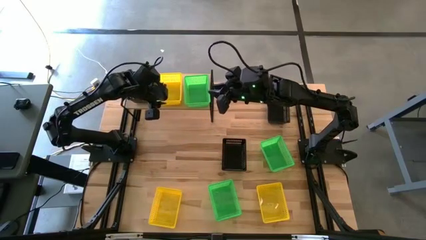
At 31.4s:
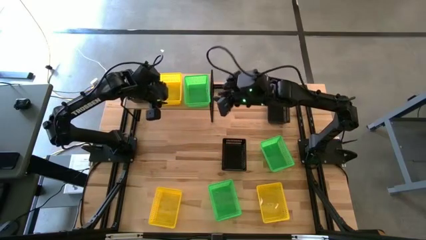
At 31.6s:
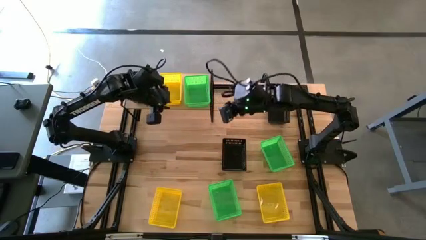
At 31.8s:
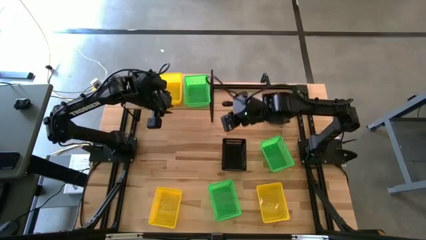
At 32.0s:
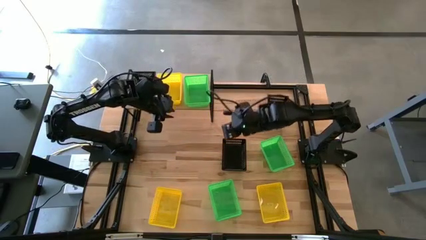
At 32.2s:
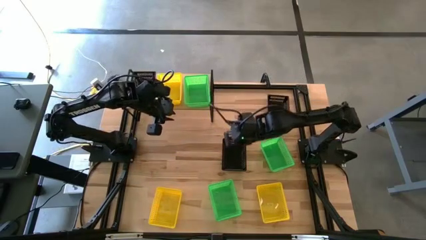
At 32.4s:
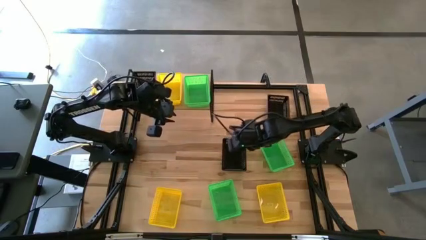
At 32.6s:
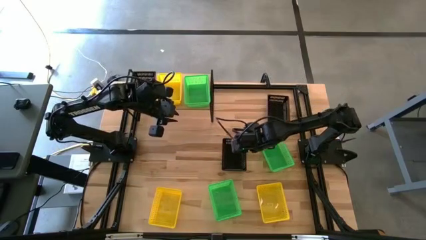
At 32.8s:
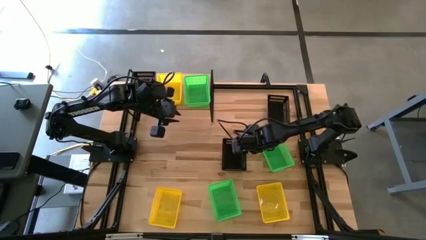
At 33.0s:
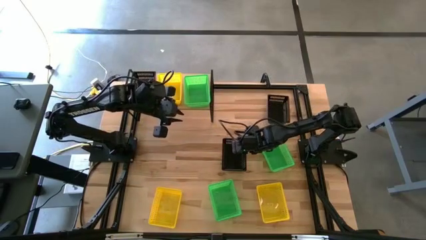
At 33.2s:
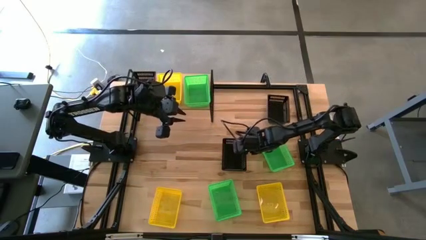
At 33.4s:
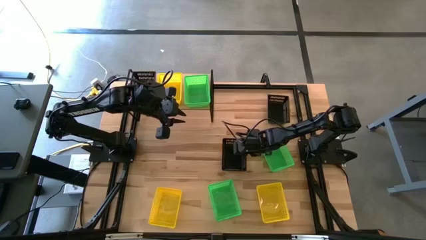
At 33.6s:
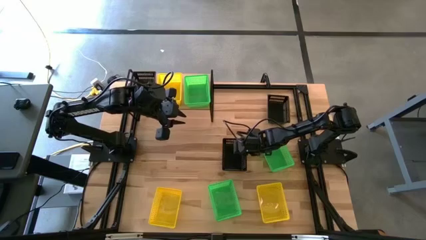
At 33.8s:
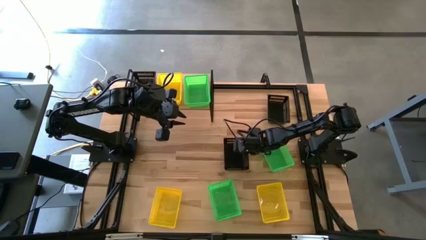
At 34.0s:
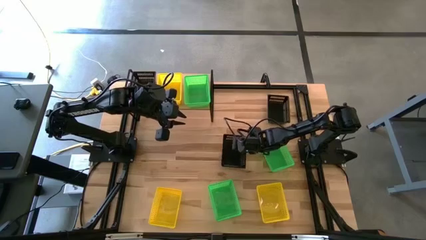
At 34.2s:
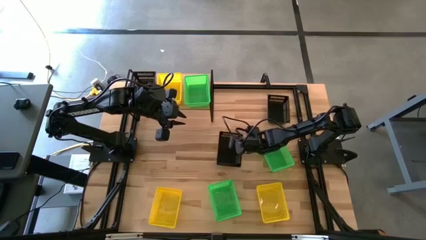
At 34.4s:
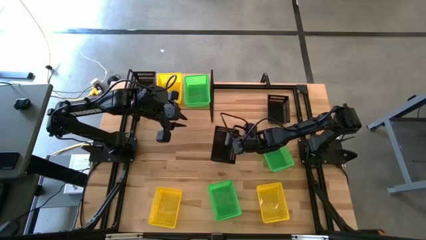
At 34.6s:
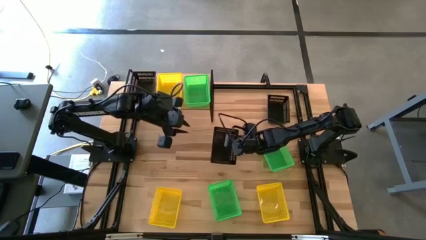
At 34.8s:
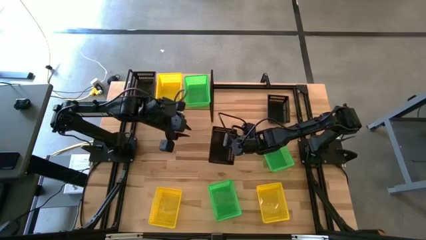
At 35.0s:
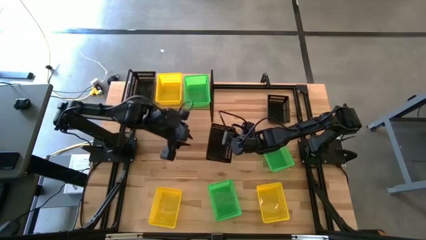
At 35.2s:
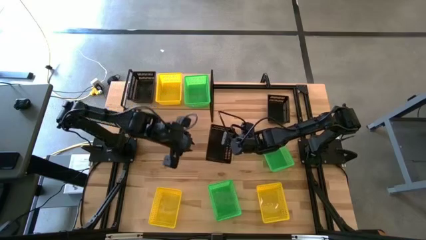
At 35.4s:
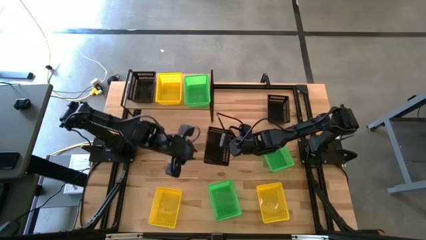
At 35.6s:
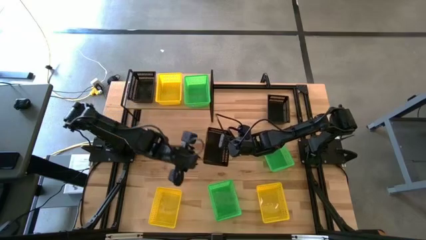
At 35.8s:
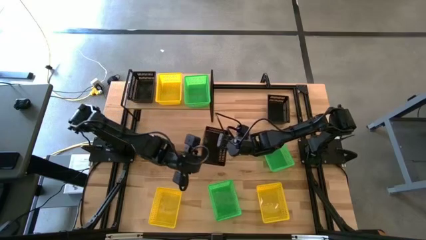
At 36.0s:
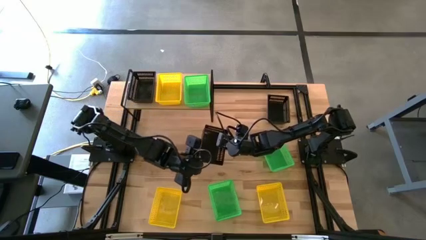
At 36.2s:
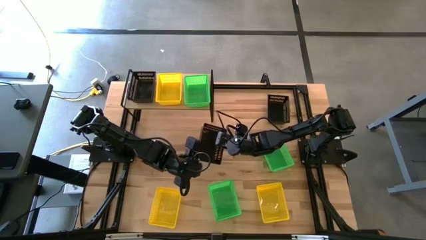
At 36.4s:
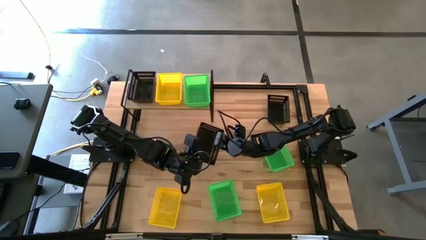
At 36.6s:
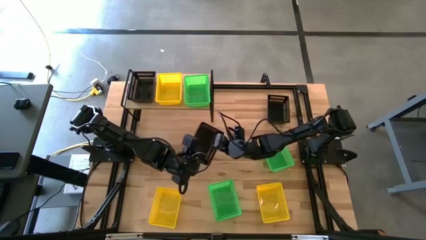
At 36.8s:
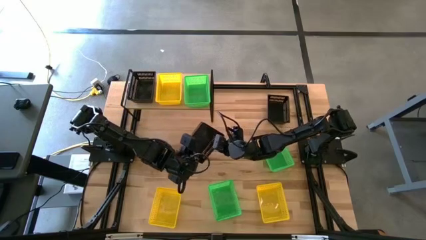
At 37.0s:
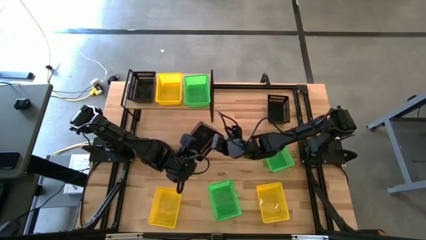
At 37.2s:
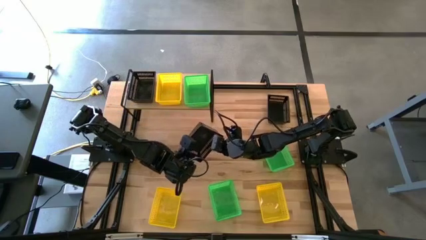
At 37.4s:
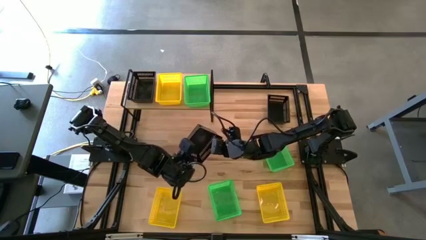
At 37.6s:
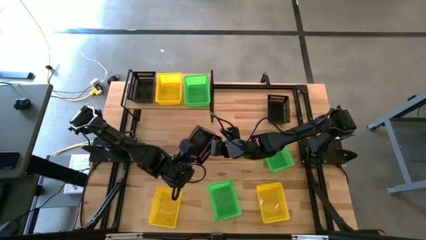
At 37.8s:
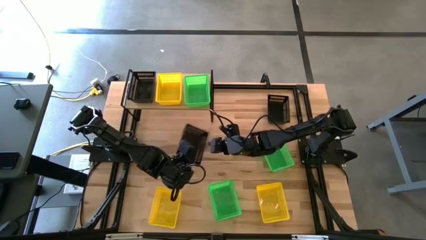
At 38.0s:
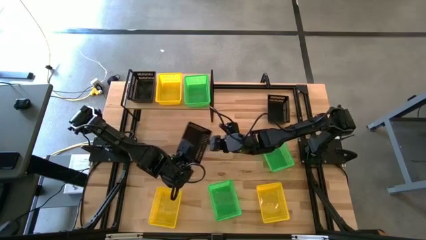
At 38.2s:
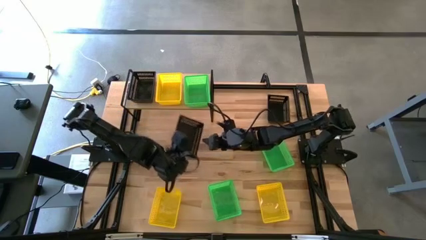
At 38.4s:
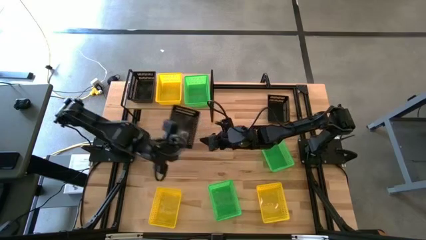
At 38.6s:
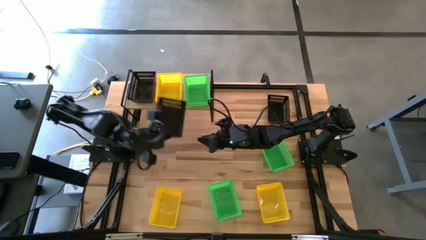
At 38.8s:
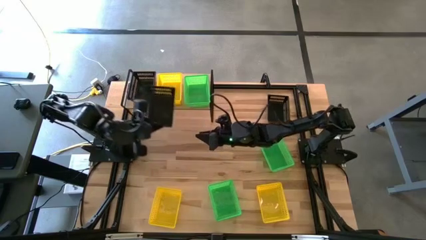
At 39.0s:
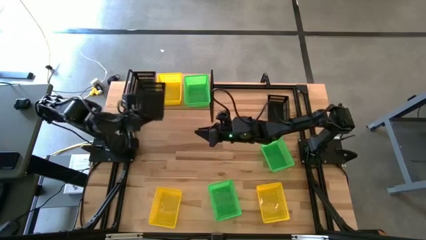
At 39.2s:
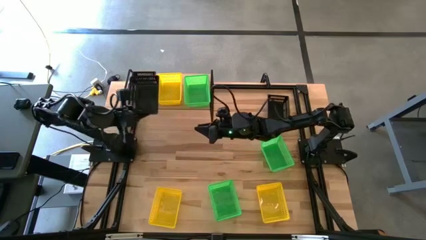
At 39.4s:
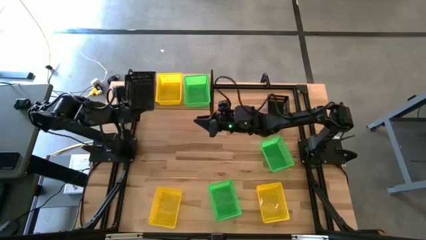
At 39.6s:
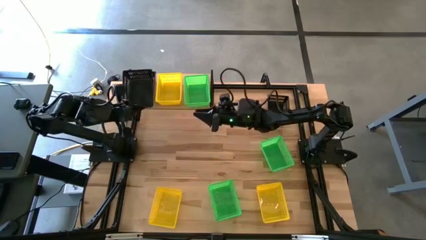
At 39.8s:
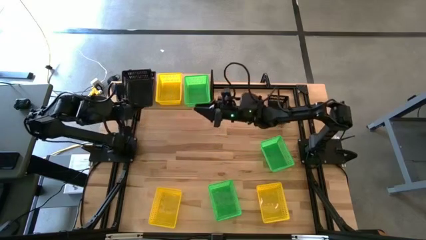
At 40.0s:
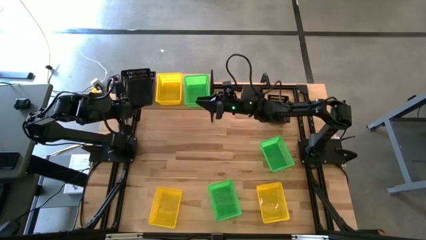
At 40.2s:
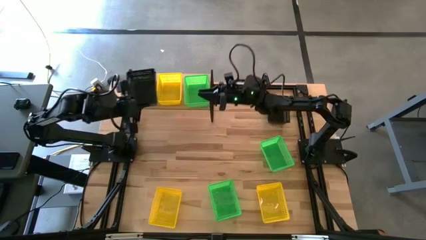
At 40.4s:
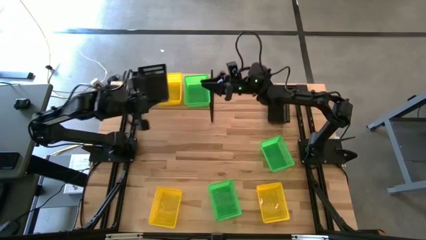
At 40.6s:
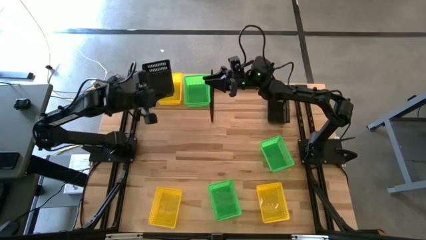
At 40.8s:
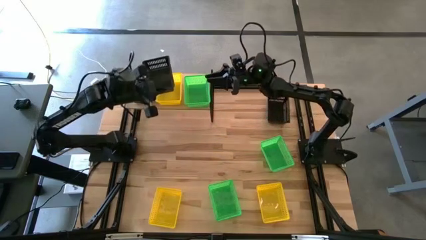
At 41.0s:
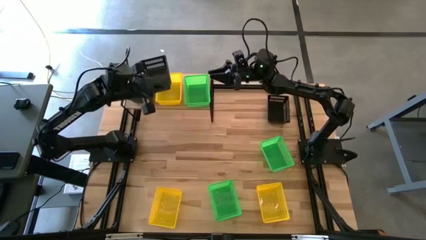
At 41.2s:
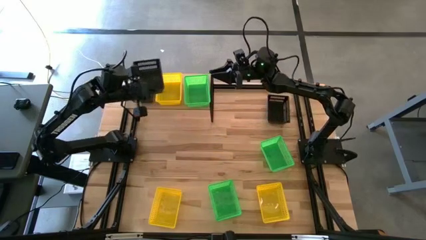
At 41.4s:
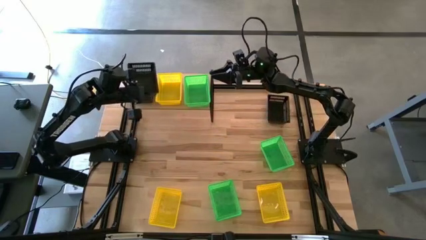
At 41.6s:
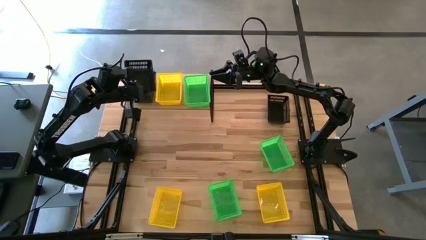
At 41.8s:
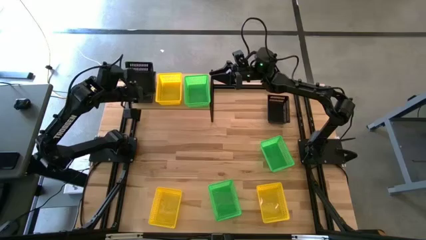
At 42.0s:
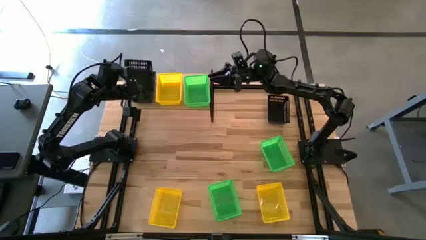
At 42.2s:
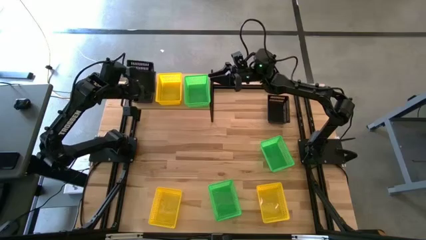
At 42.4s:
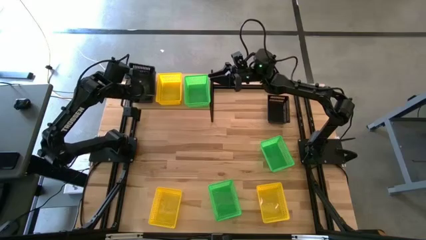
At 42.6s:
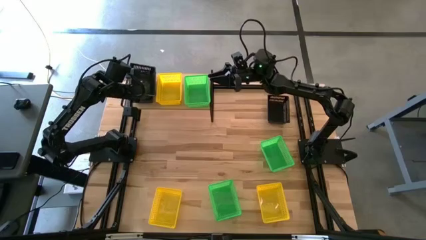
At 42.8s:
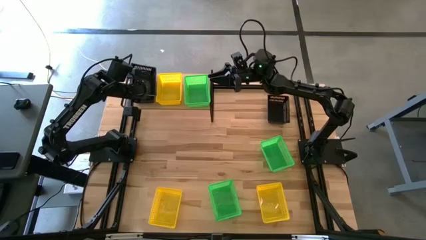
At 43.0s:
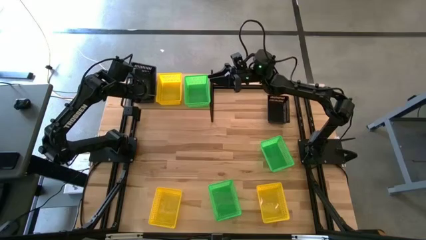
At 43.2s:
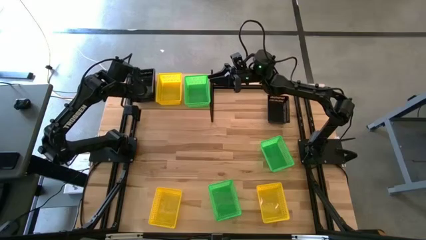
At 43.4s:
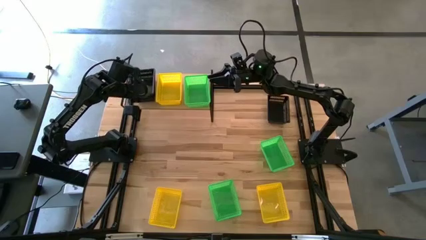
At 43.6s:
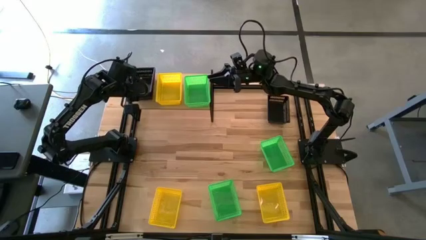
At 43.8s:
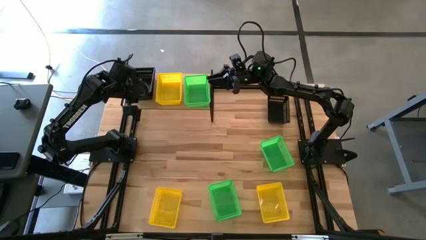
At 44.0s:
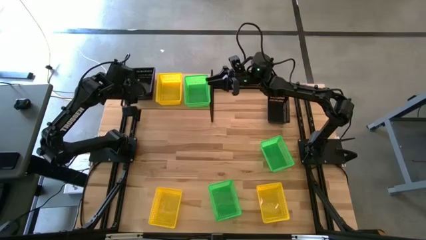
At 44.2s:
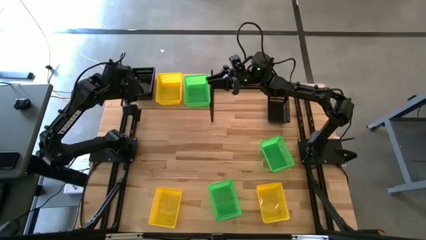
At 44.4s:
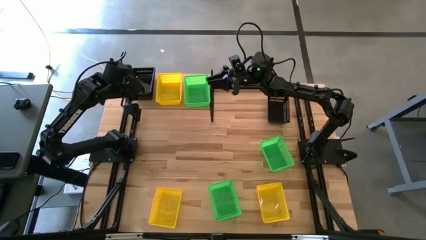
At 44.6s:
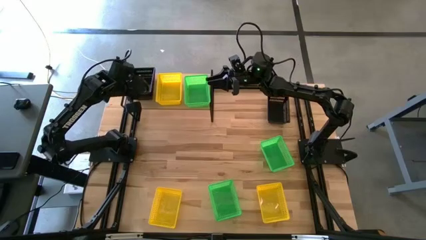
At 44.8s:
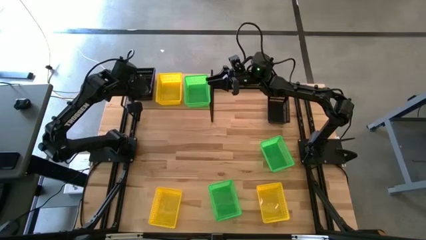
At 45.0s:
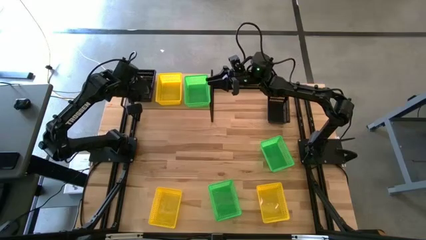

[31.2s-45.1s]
Task: Stack baskets on shelf by color
Stack the bottom black basket on top of the black basket on shelf

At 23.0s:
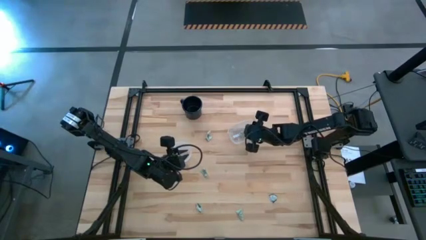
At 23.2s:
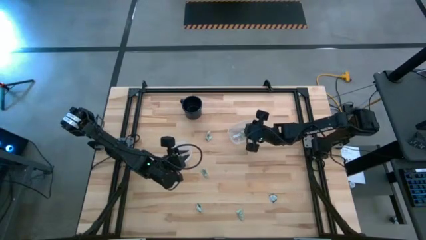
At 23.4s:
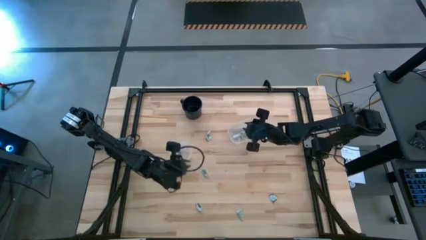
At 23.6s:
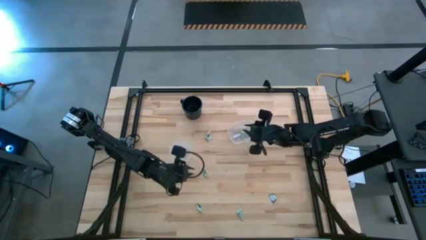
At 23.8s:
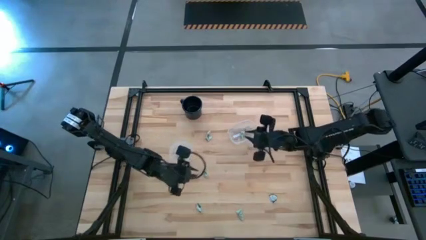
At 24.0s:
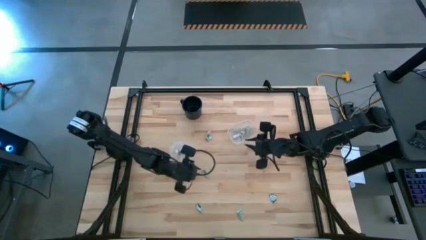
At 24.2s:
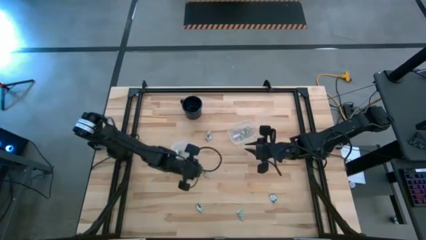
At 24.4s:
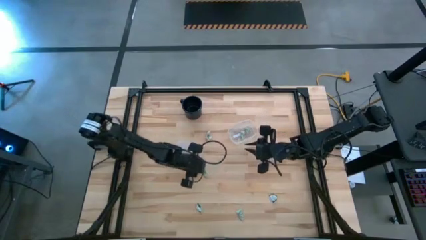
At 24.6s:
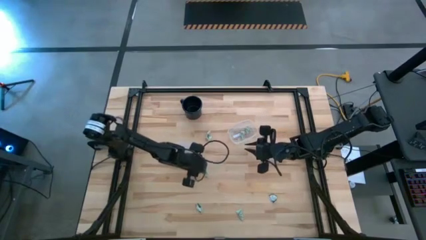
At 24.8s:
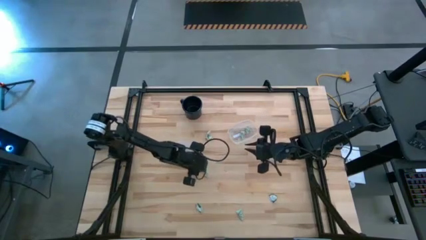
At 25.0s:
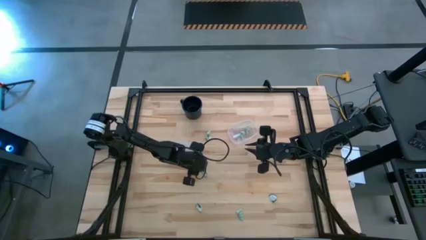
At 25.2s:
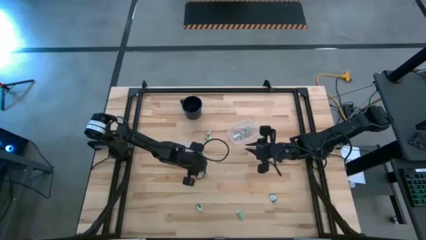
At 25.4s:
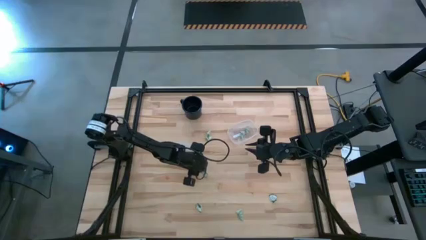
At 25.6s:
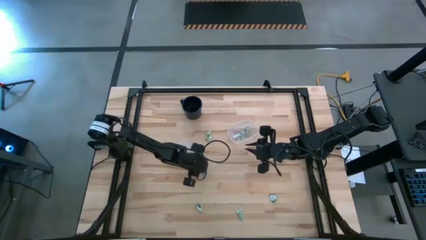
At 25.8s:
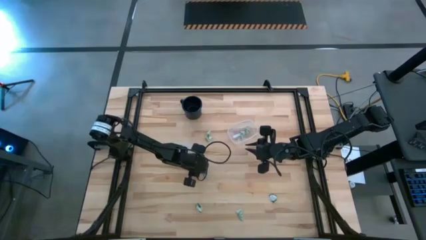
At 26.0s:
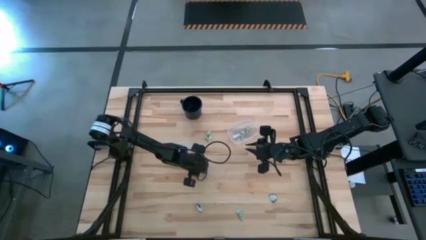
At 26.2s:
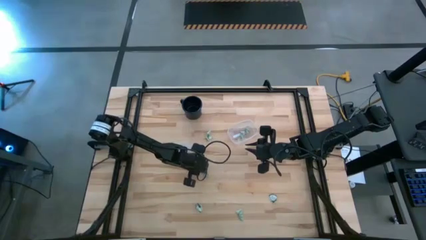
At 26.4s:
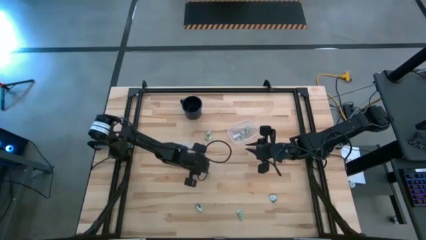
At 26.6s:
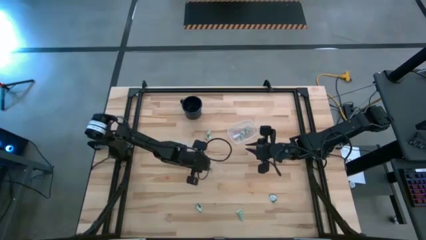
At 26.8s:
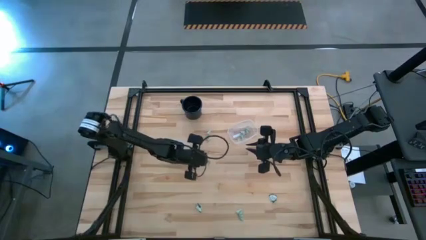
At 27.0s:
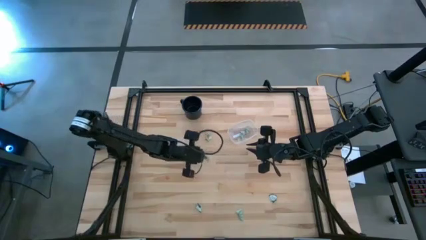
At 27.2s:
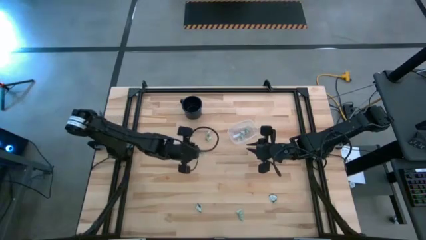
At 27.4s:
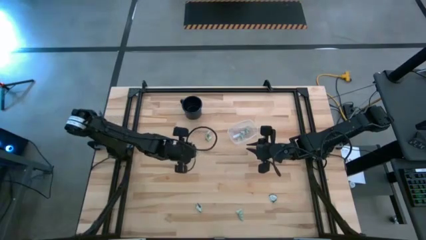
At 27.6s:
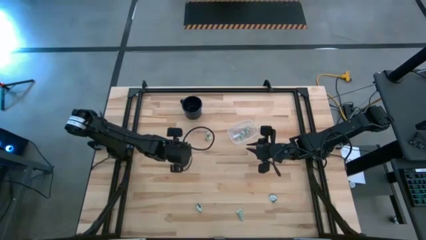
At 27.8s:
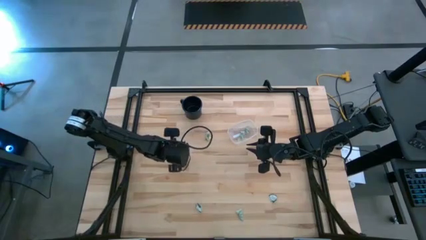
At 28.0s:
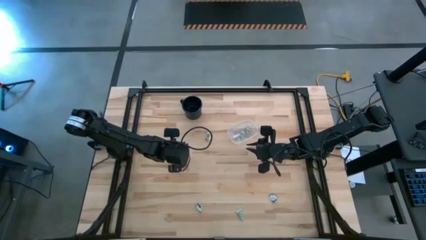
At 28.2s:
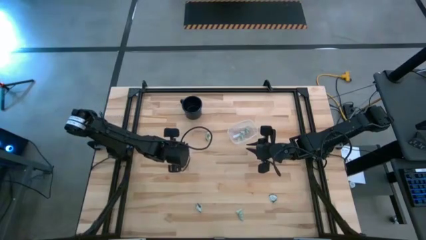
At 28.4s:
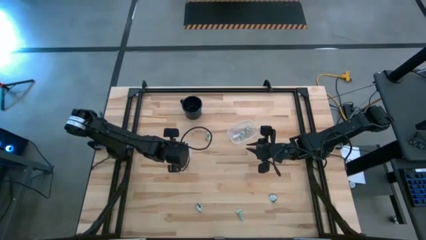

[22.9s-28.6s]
Task: Pick and place items into bin
Put the stevia packet into the circle transparent bin
